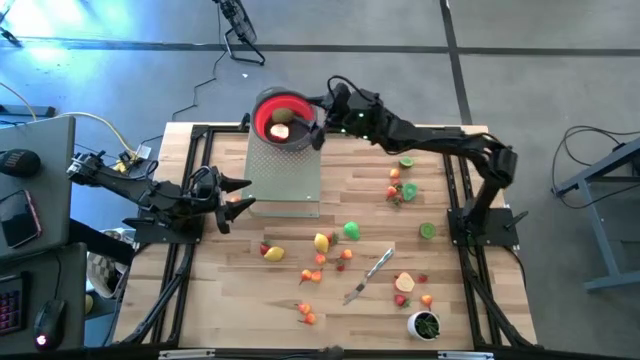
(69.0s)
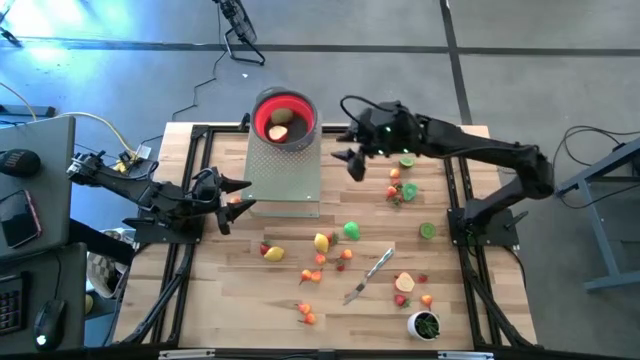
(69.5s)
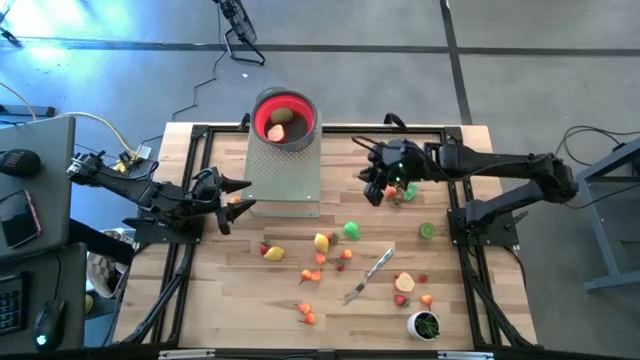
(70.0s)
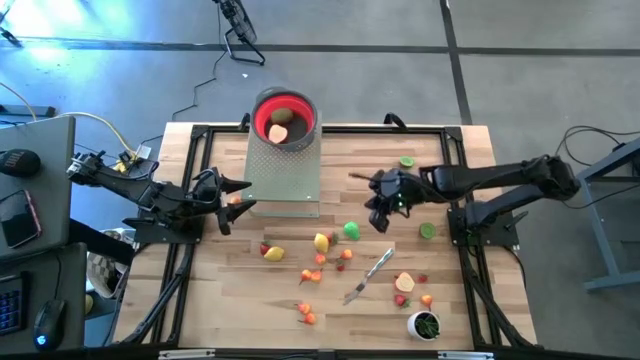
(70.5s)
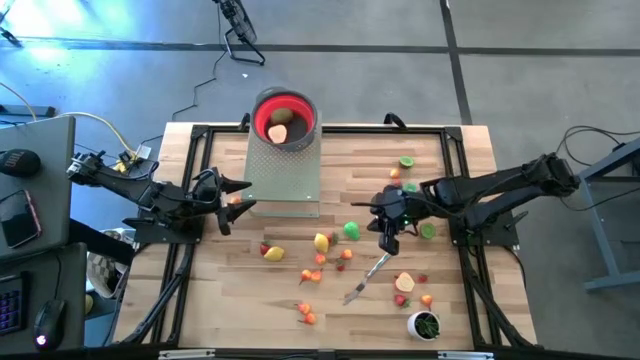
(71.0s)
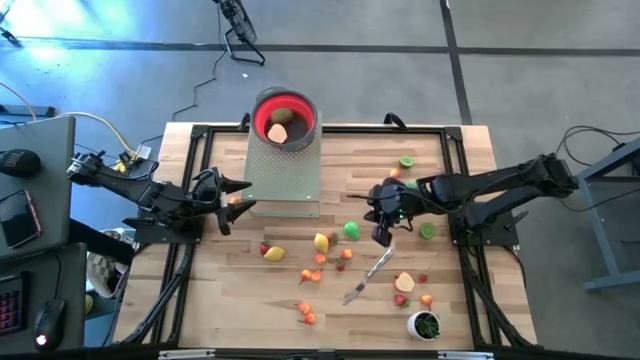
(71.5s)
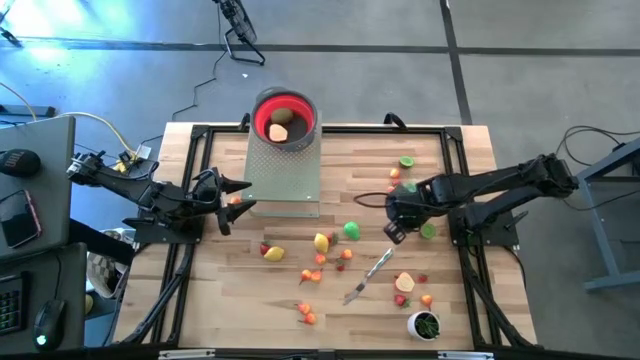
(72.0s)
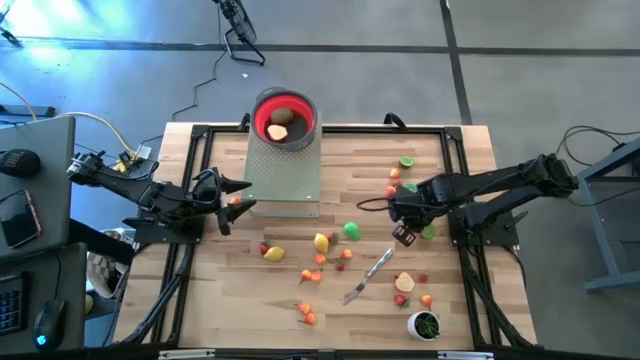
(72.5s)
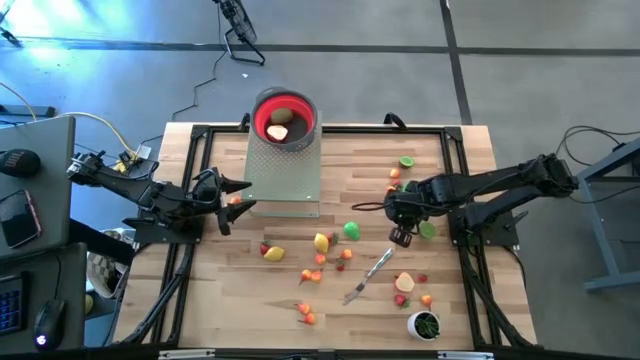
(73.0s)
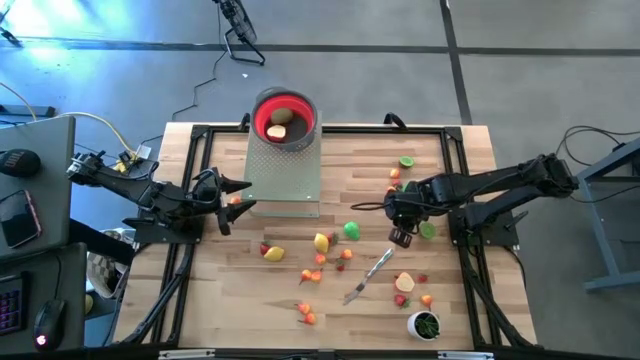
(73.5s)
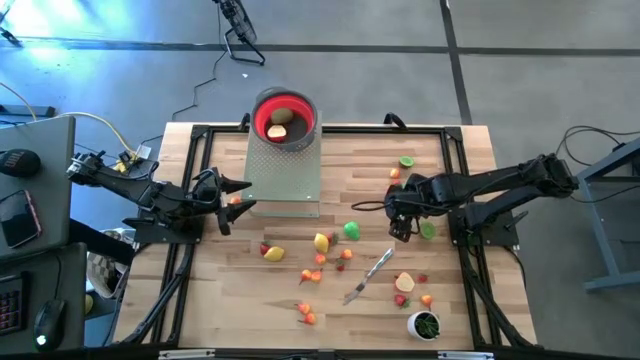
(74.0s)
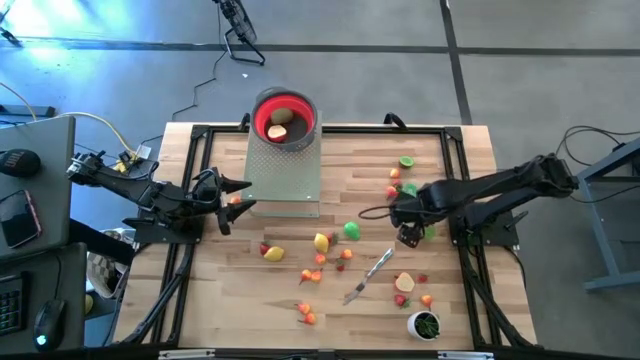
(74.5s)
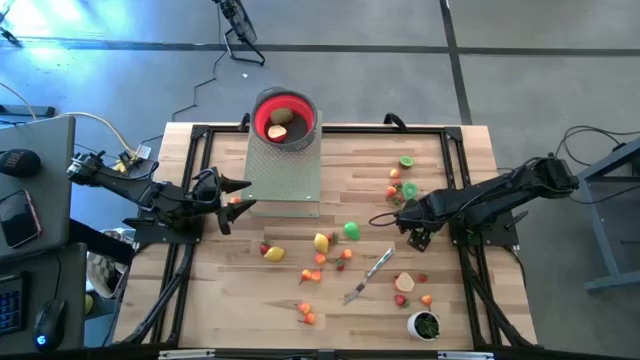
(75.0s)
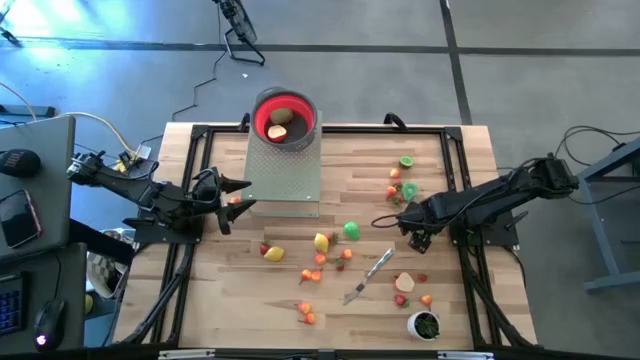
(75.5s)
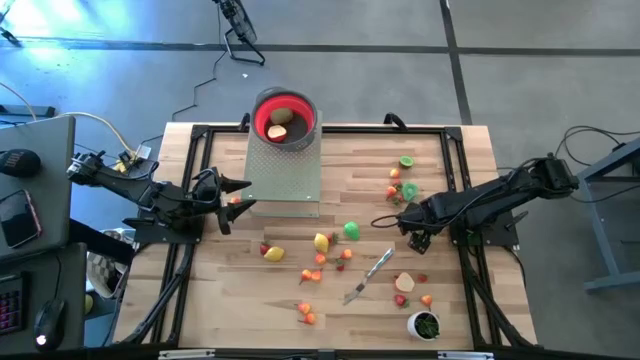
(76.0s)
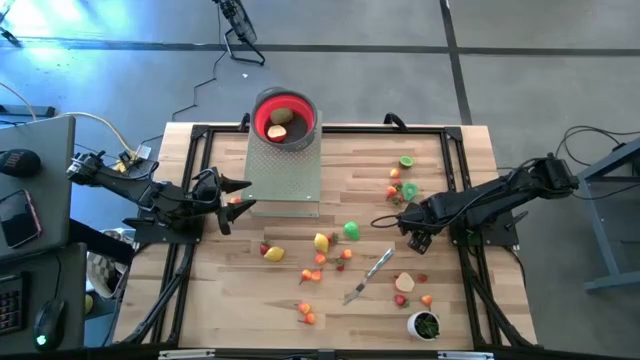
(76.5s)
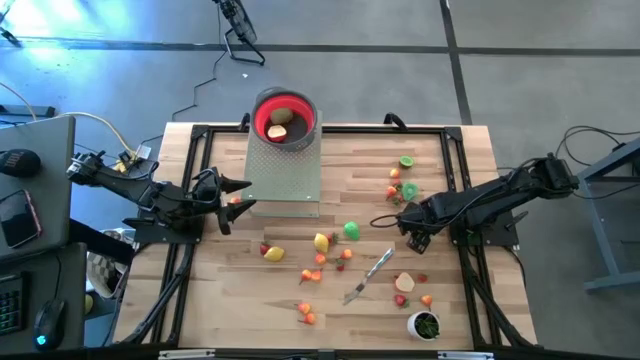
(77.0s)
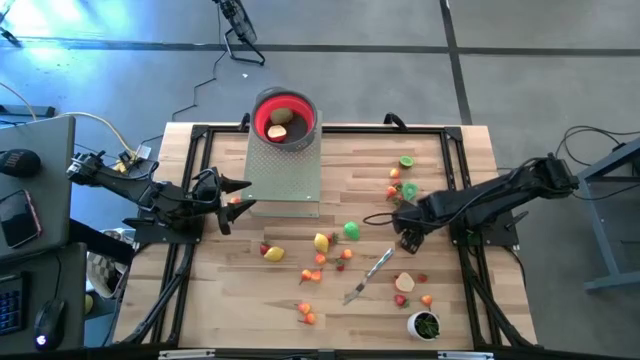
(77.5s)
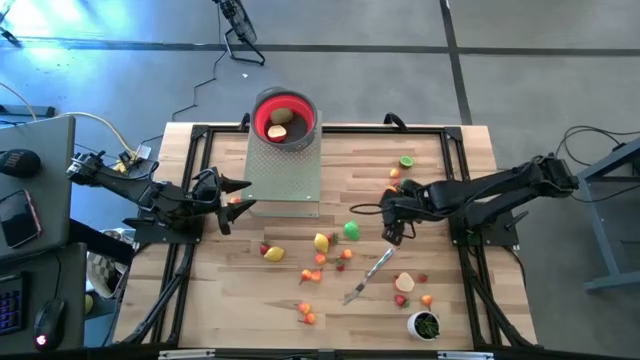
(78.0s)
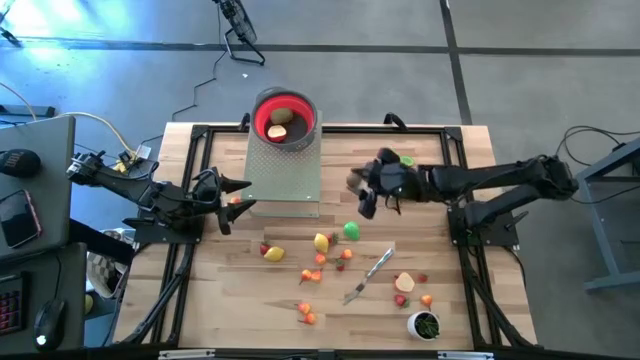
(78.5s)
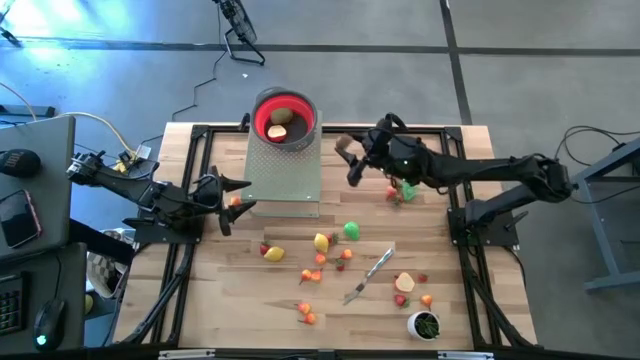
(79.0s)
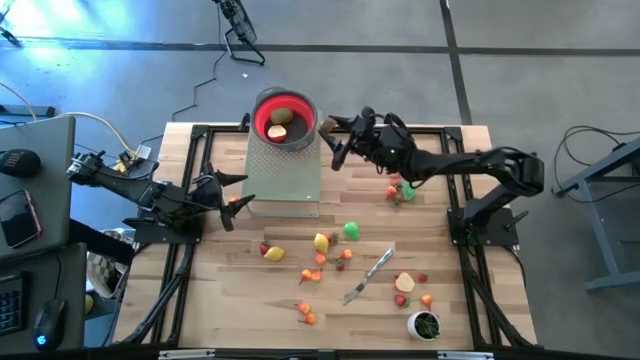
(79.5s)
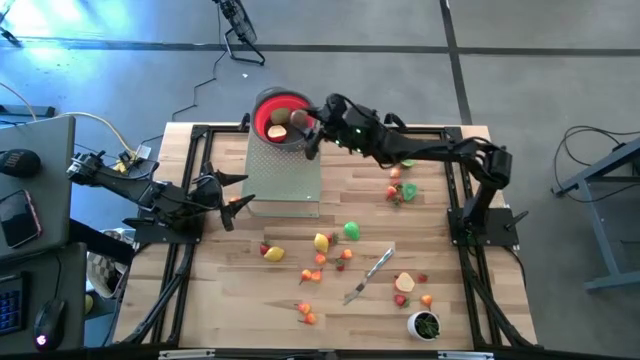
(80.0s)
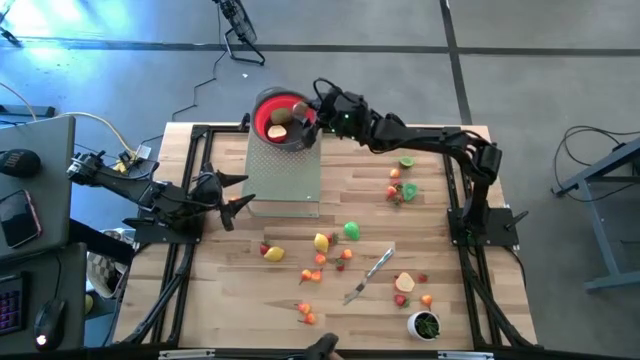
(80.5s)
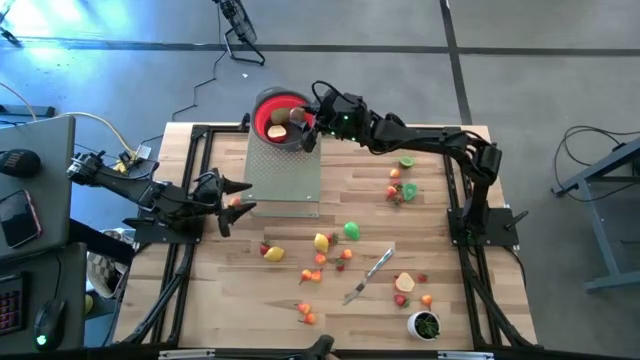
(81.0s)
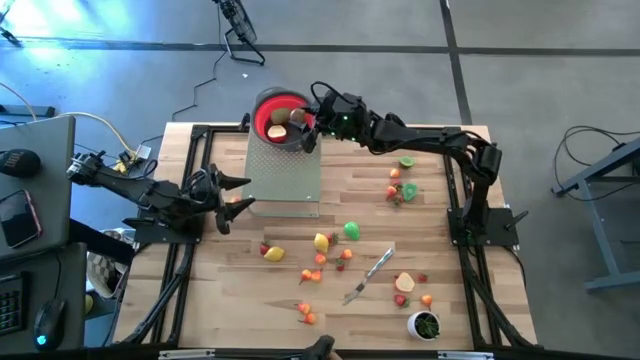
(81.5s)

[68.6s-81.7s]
Task: Pick & Place Fruit
Put the half kiwi into the red strainer on the shelf

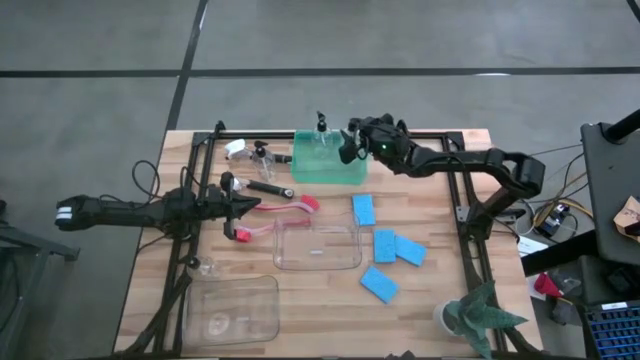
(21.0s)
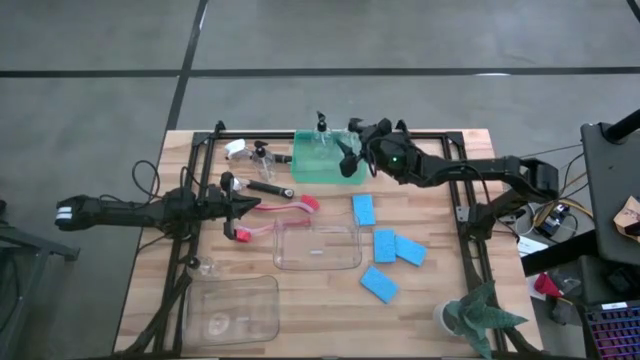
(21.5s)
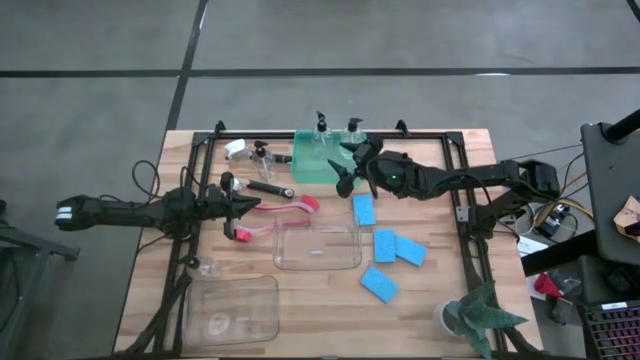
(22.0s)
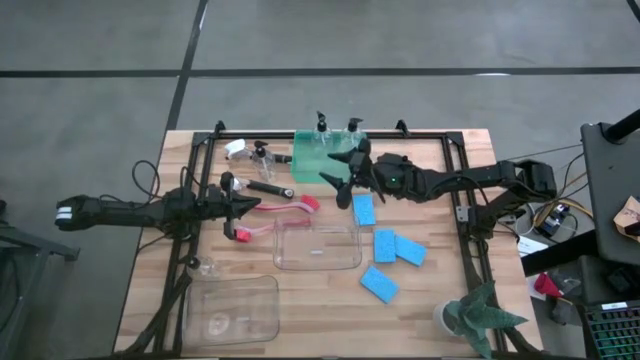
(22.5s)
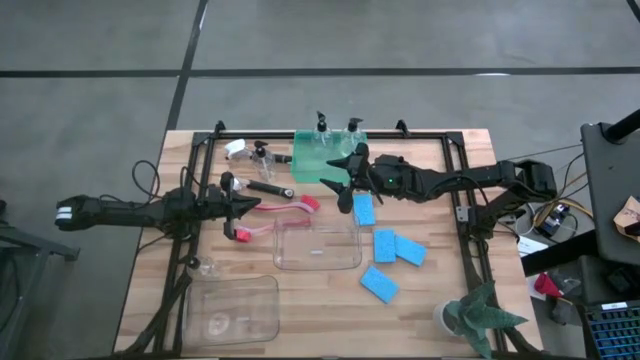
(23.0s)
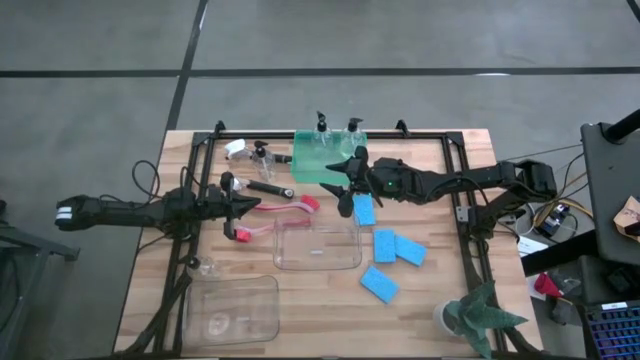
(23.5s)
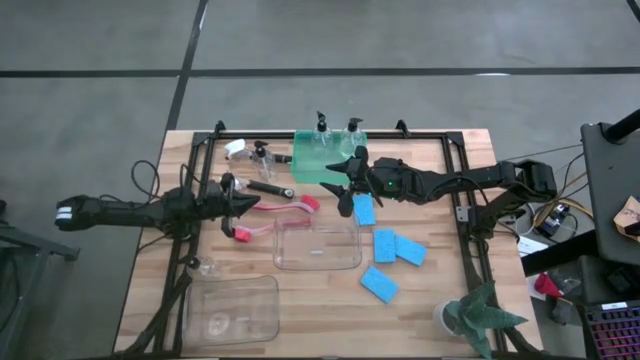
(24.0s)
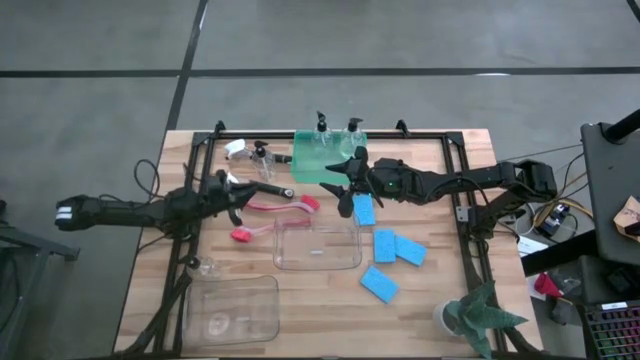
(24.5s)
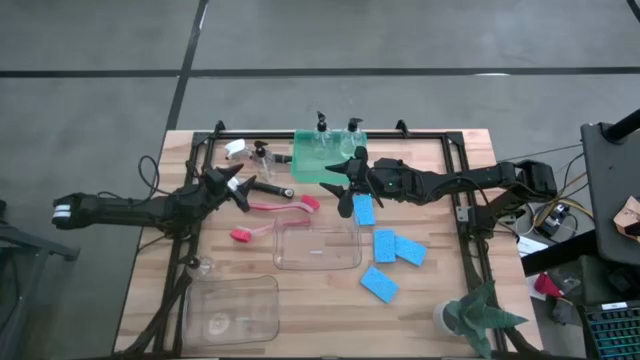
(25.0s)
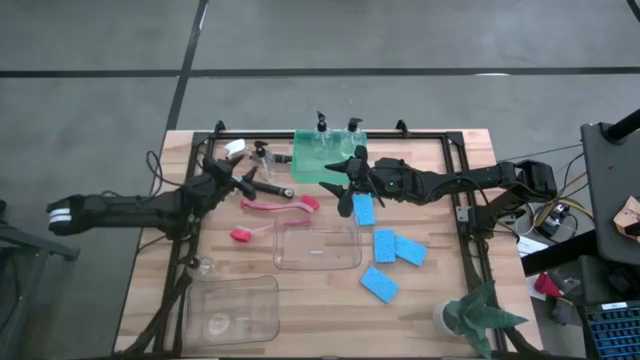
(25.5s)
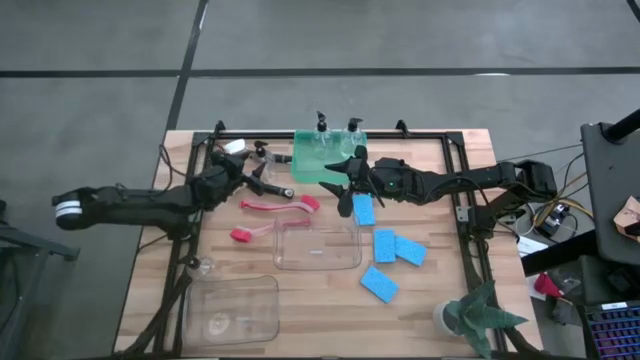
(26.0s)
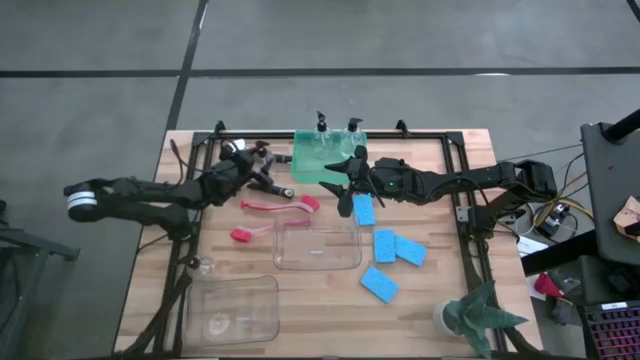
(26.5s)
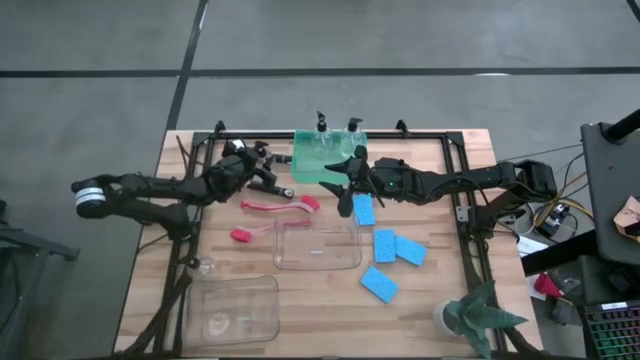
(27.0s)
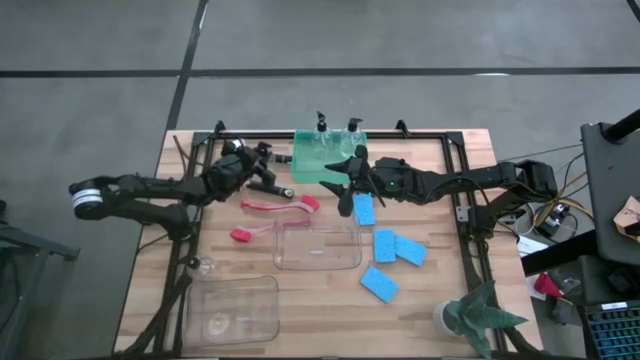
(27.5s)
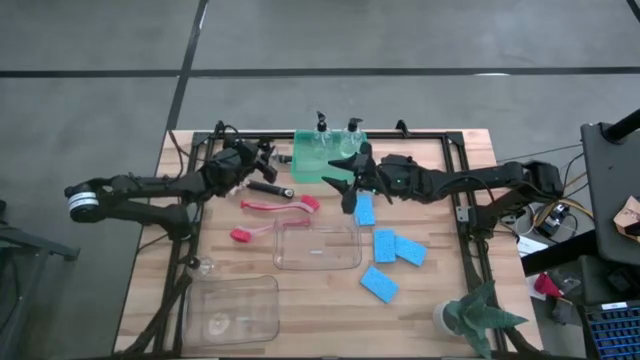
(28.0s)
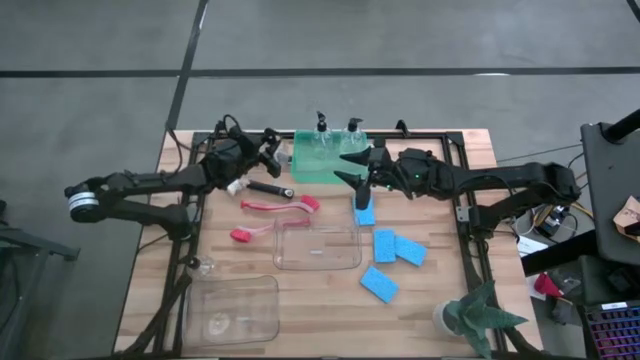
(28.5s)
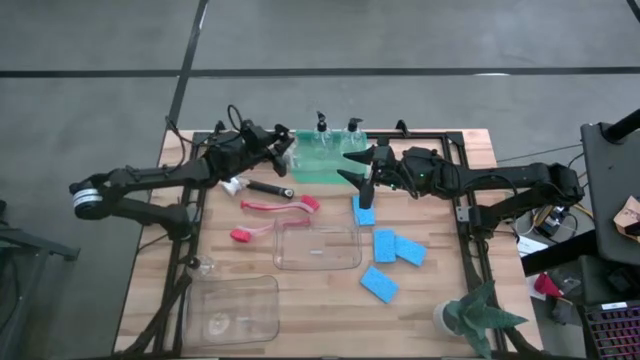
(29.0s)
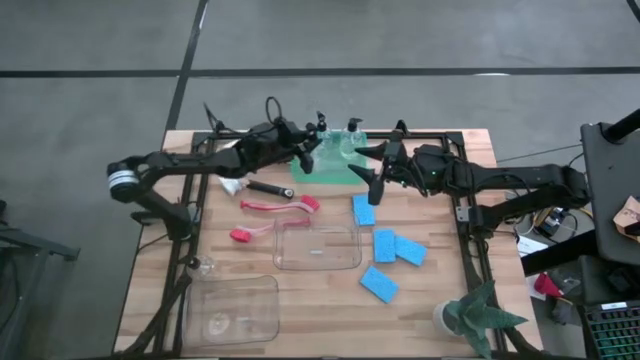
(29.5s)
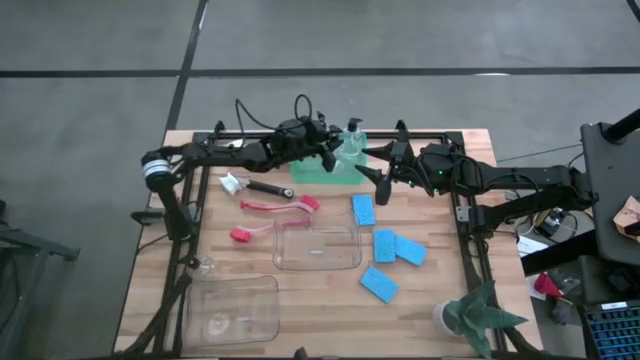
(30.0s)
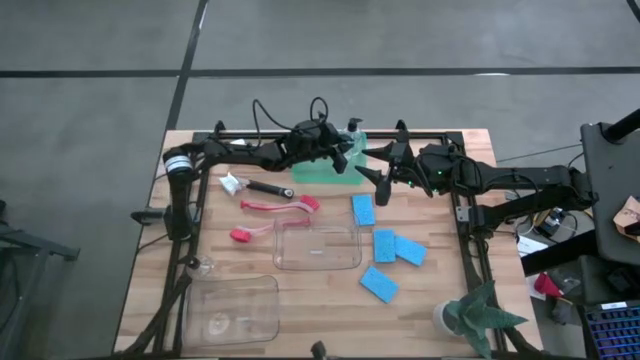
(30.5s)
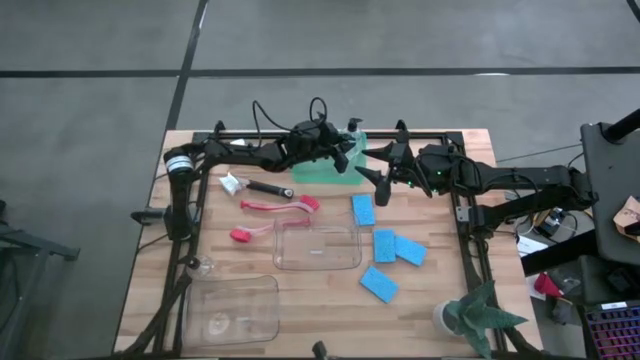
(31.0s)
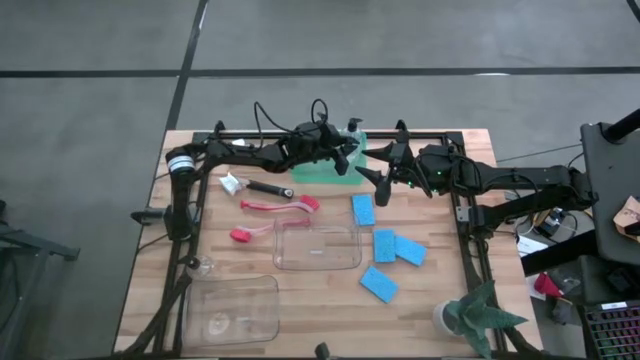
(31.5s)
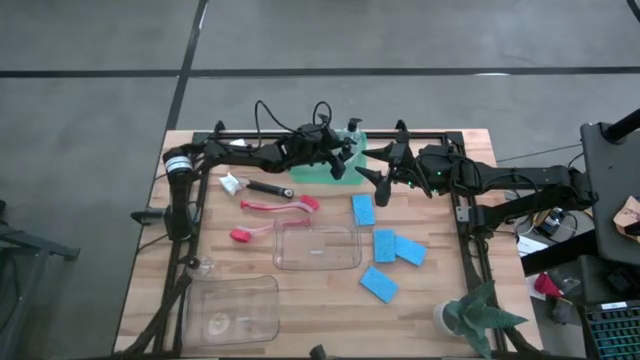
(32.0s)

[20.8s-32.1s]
Task: Pick & Place Kitchen Sink Supplies
Put the transparent soap dispenser into the green bin
